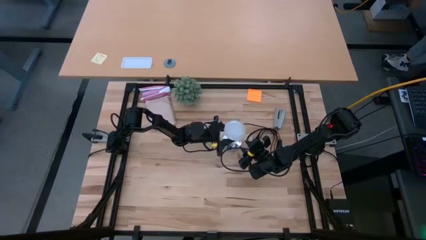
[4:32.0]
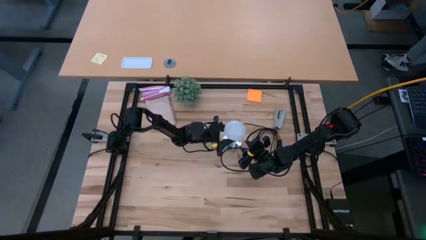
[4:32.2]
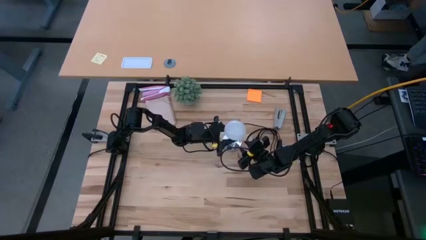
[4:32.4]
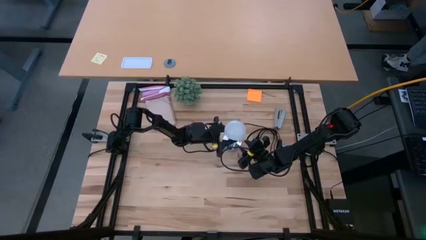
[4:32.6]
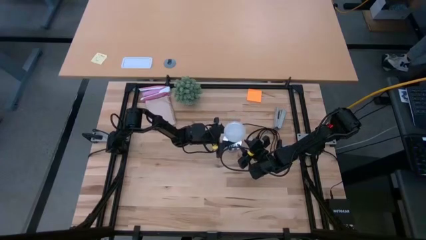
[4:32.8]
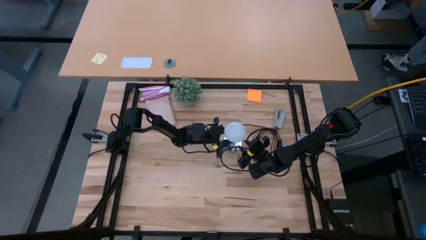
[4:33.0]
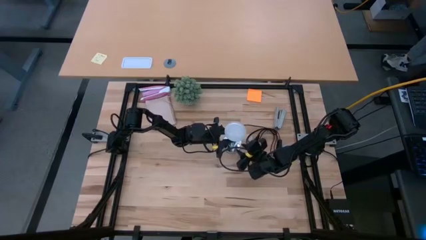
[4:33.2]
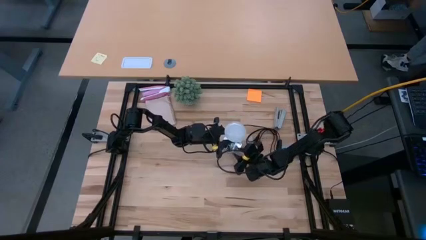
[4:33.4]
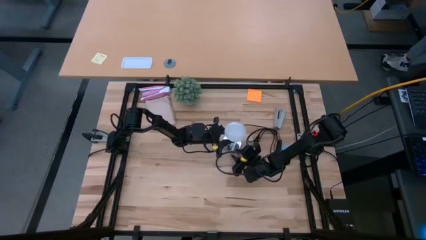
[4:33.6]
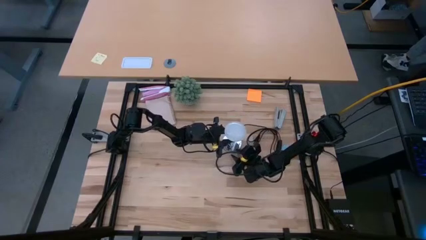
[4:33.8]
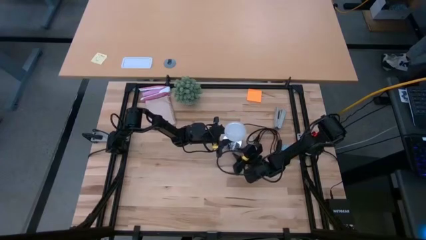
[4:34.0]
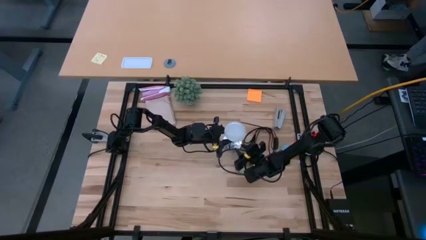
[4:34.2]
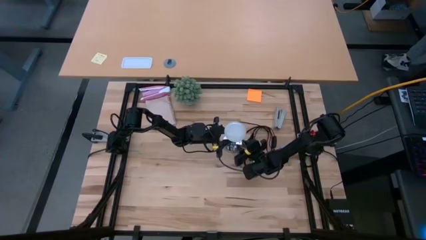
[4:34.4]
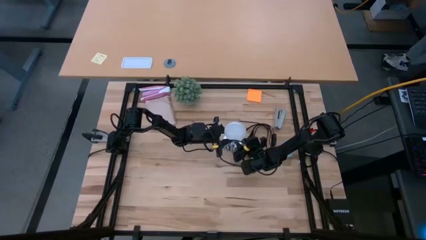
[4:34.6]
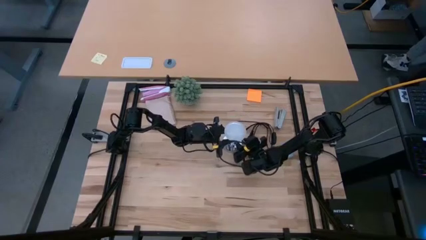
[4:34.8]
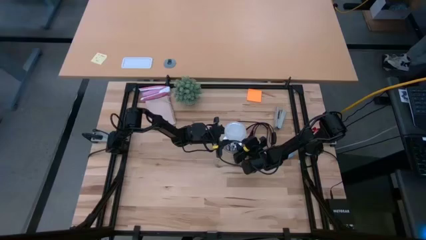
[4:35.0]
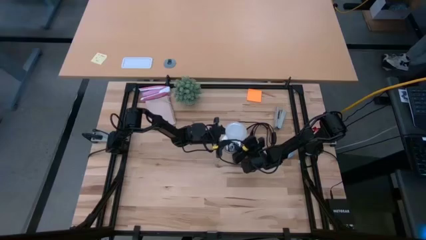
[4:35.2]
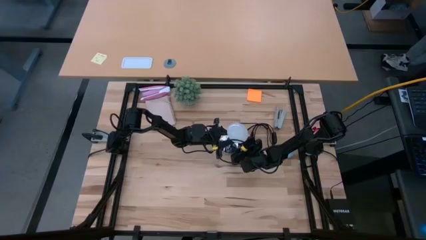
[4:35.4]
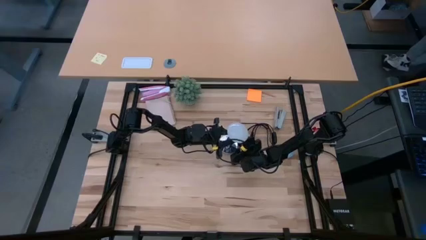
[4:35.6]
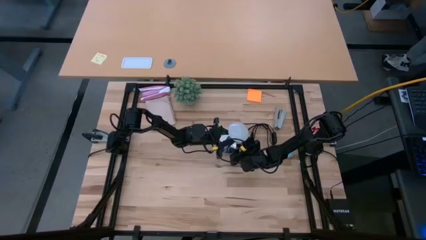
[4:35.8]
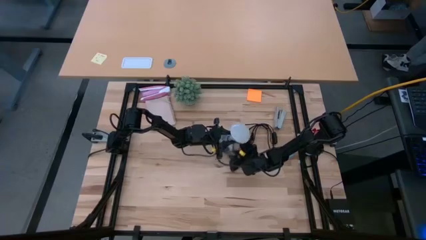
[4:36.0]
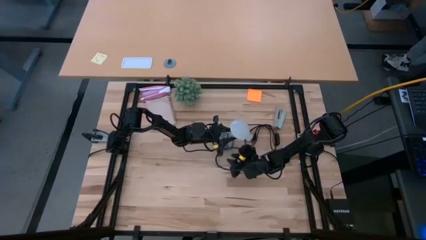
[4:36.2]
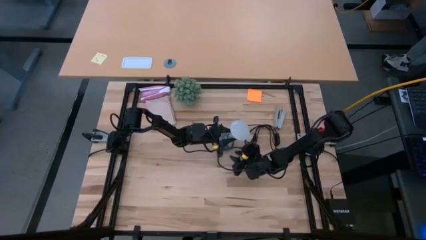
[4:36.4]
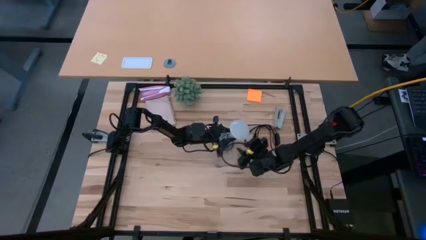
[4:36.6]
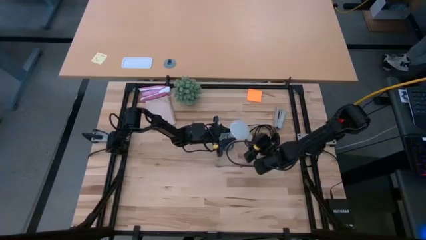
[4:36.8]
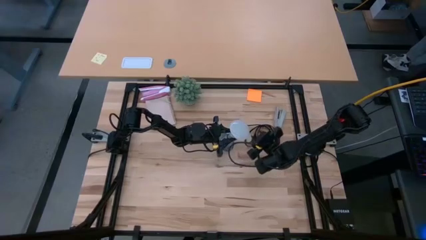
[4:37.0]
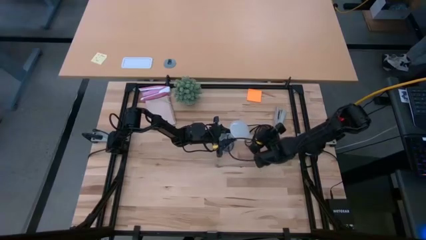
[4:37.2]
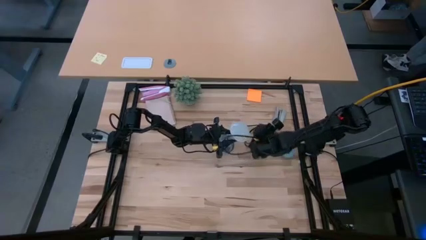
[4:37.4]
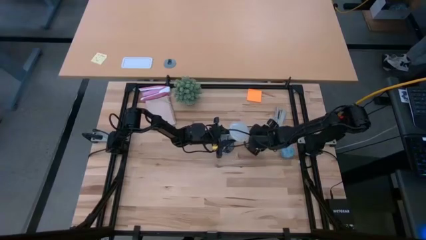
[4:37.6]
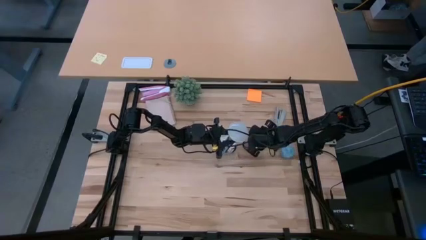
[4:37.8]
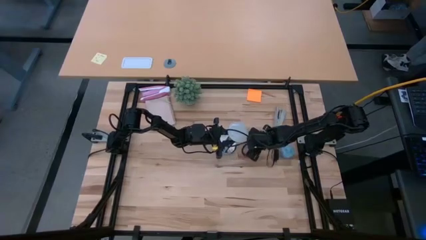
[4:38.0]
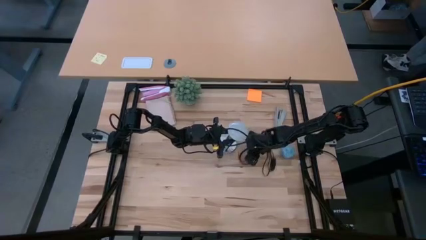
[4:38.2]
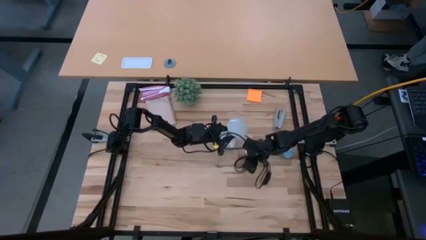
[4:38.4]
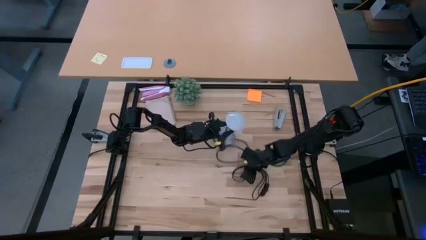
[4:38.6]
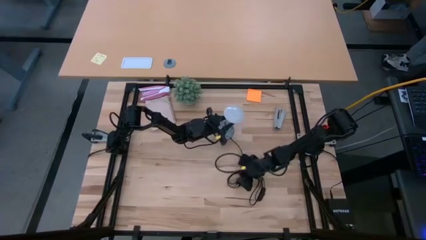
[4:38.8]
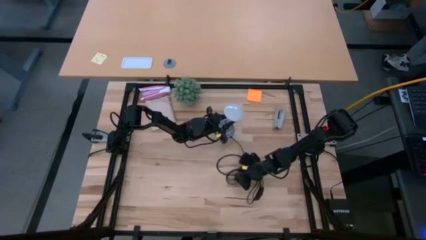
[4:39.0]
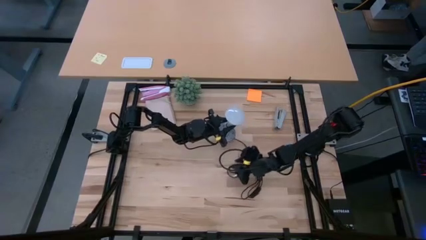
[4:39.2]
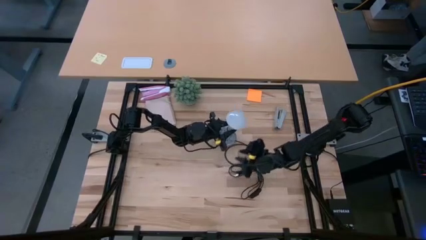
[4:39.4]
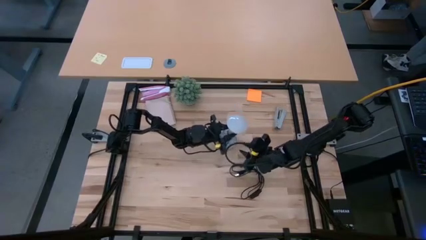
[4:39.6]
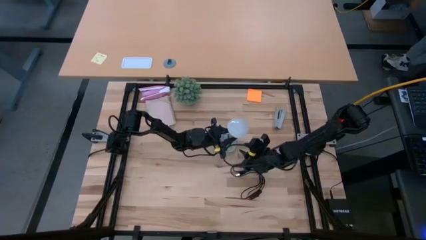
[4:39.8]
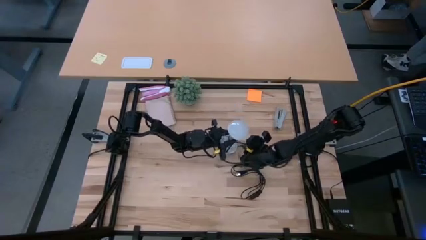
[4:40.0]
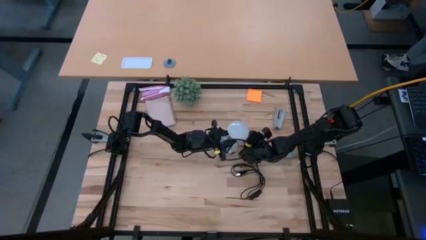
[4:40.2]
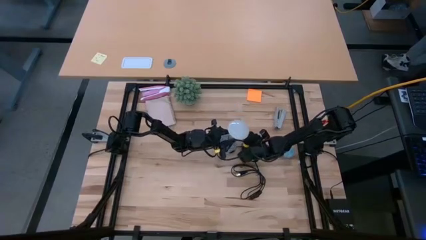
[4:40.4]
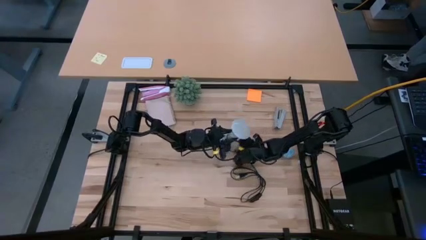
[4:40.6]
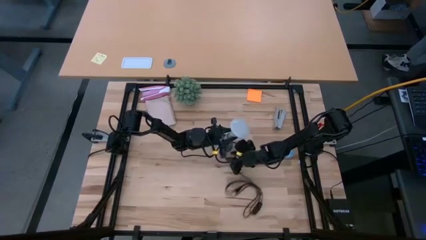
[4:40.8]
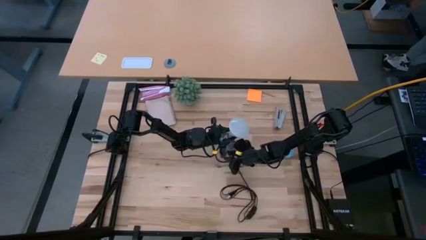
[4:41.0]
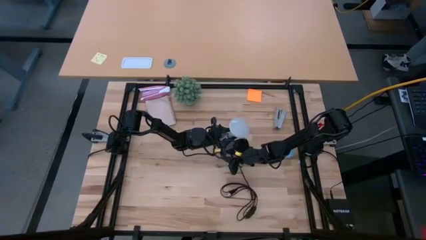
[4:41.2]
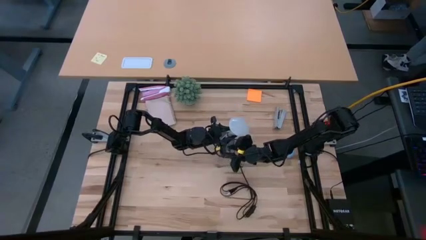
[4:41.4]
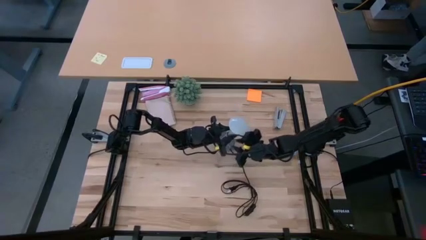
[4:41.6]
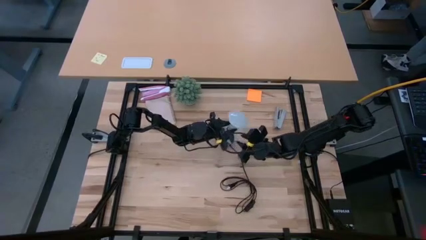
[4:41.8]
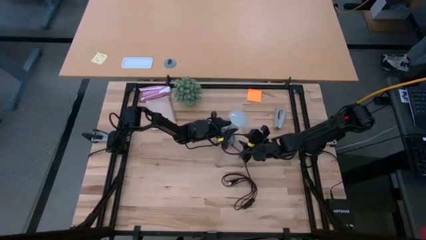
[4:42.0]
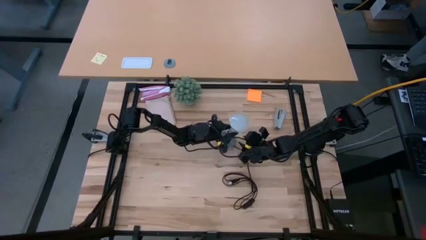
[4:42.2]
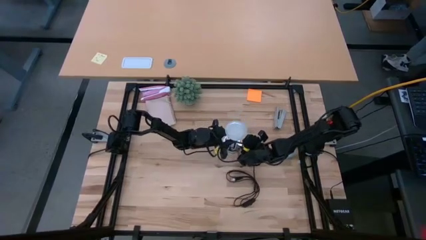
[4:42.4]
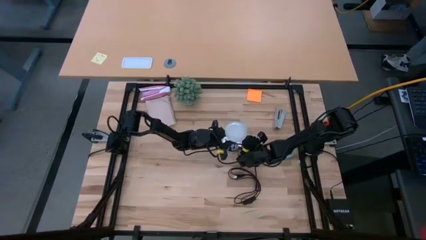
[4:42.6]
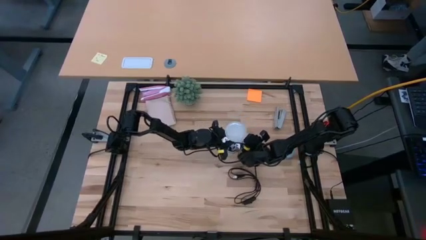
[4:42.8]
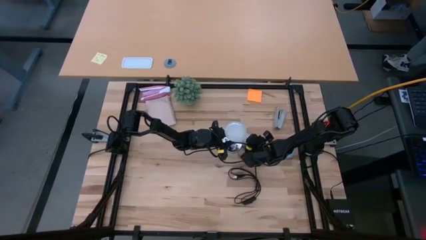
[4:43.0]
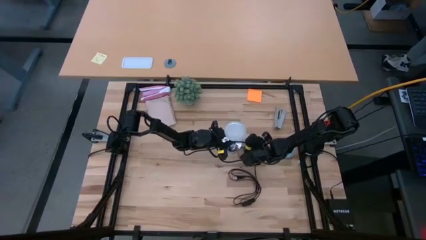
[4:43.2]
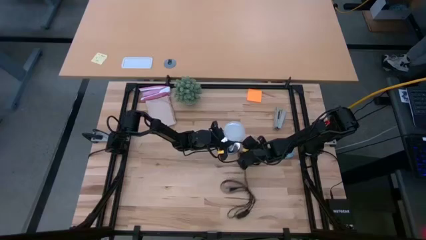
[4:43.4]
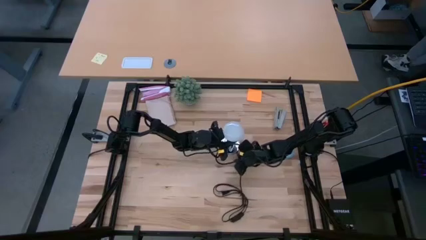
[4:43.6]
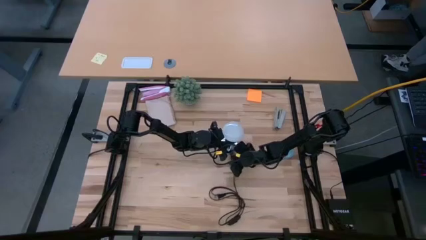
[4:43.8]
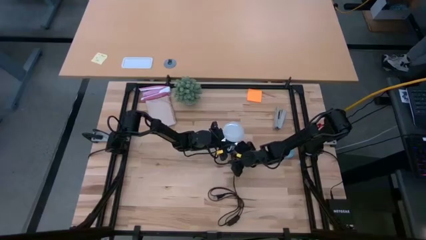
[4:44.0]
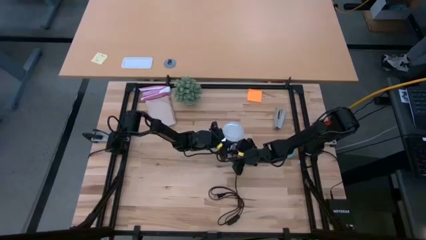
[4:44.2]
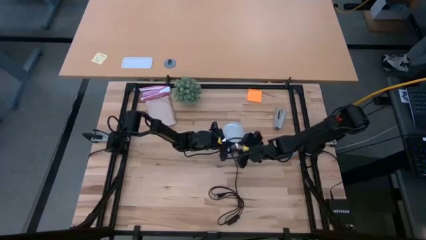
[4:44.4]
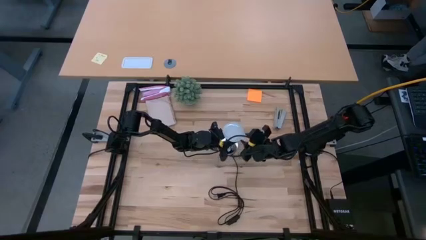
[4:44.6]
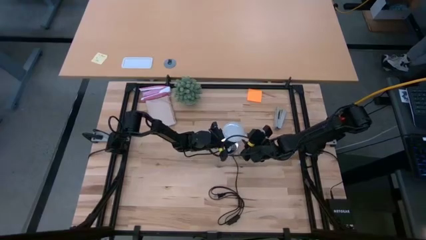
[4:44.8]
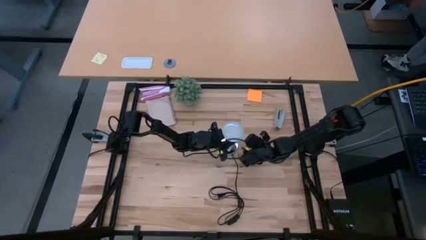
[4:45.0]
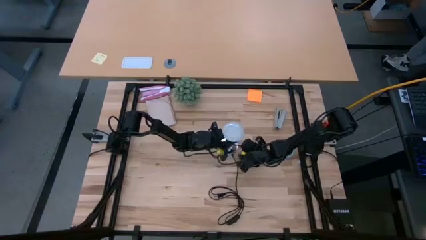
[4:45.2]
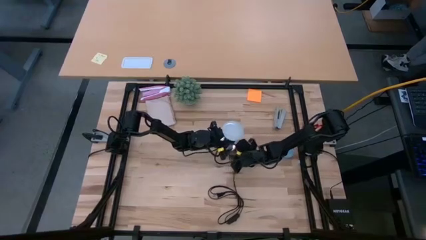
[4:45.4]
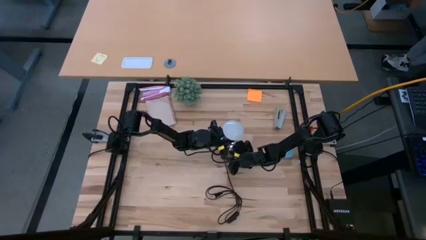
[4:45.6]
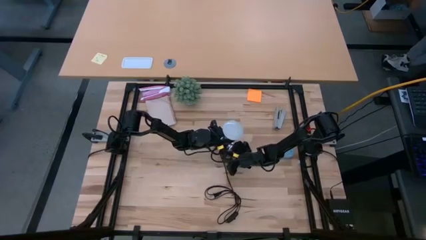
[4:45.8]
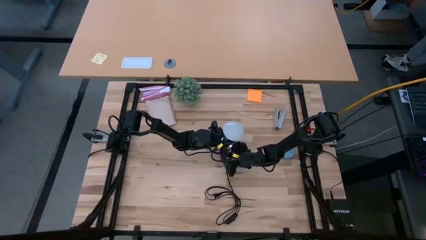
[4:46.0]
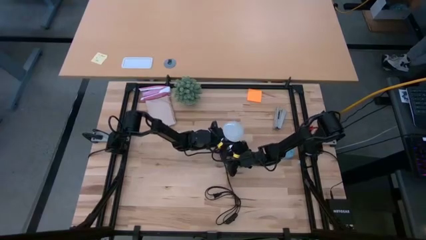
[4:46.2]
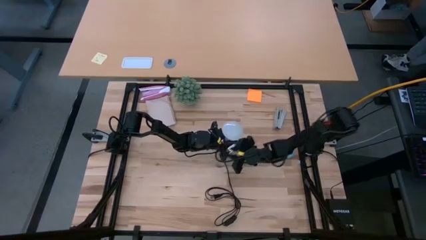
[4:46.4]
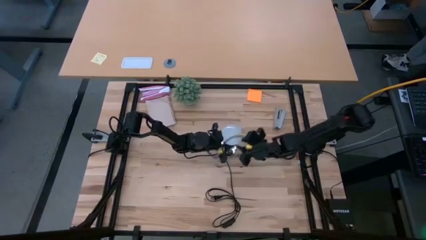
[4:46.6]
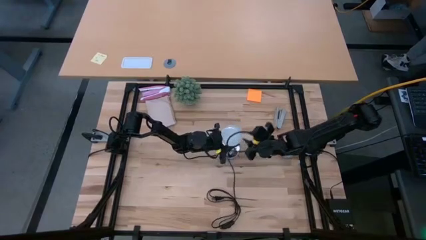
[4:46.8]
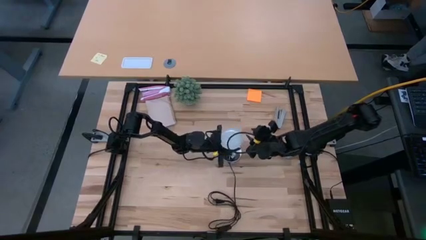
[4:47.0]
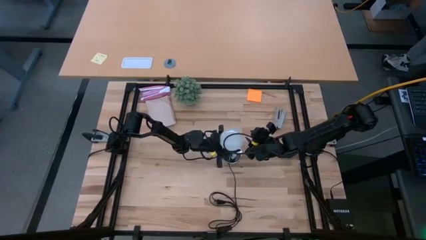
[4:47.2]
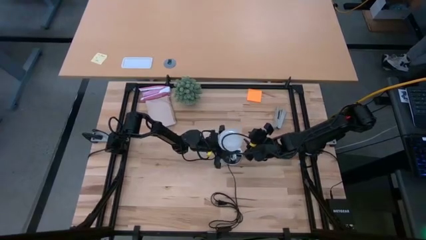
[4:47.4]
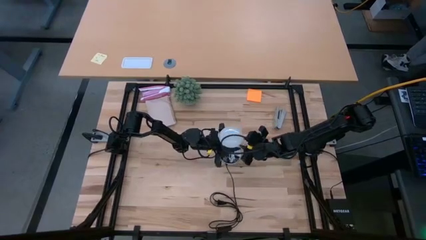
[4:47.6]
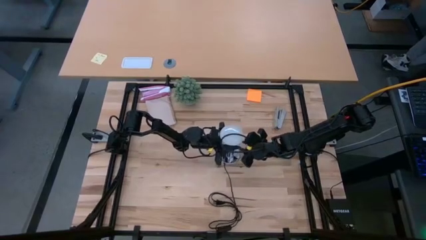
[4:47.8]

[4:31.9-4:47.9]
Task: Screw lightbulb
Remove the lightbulb from the lamp
